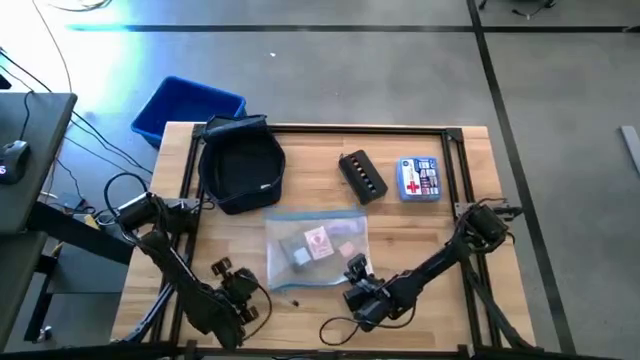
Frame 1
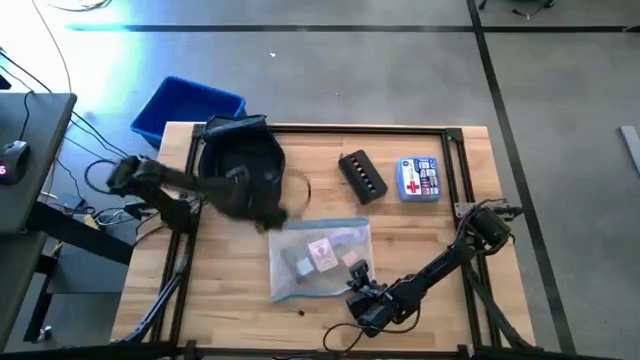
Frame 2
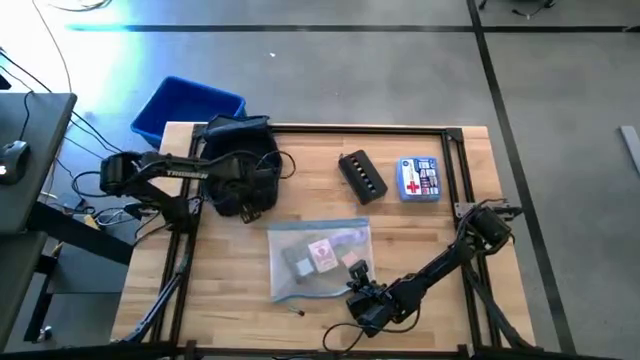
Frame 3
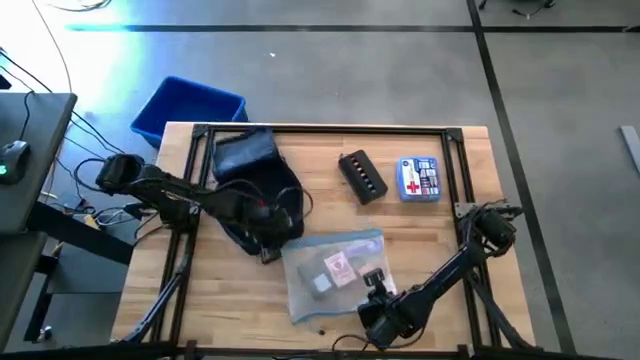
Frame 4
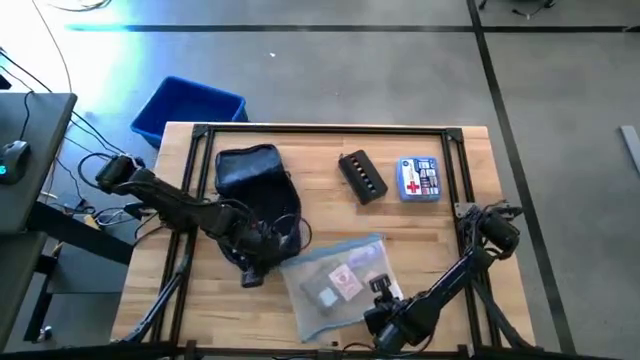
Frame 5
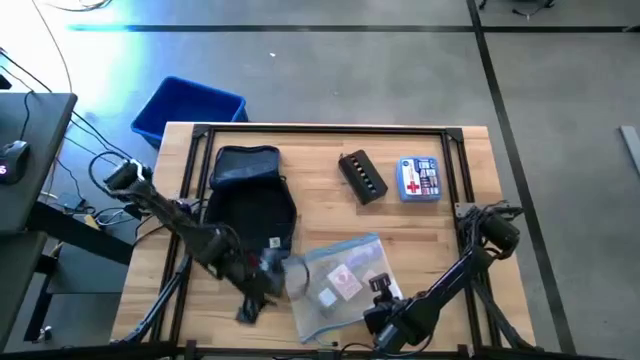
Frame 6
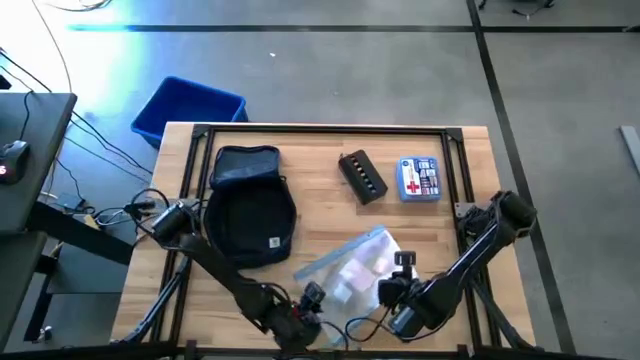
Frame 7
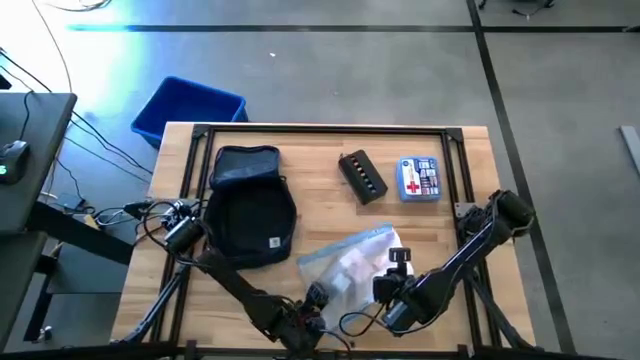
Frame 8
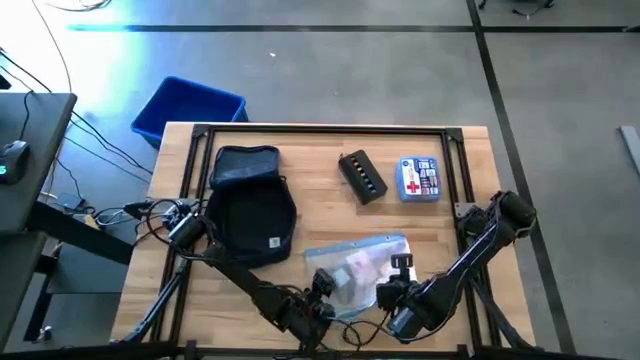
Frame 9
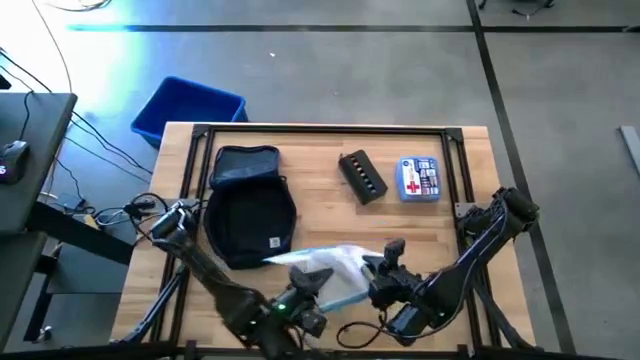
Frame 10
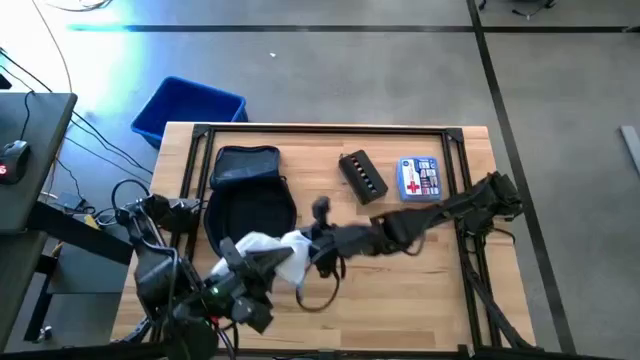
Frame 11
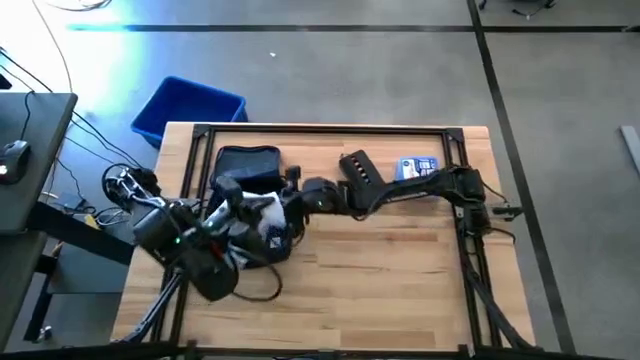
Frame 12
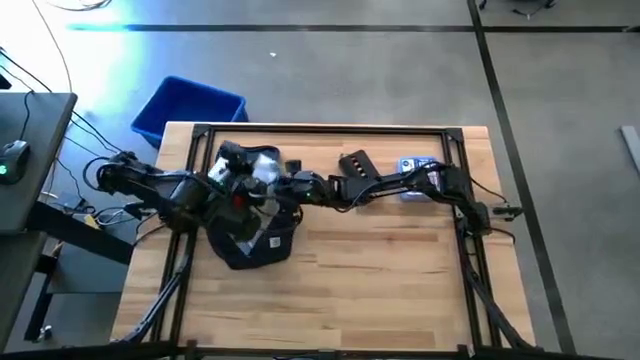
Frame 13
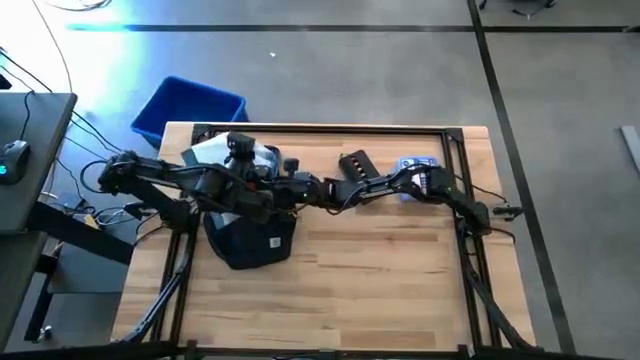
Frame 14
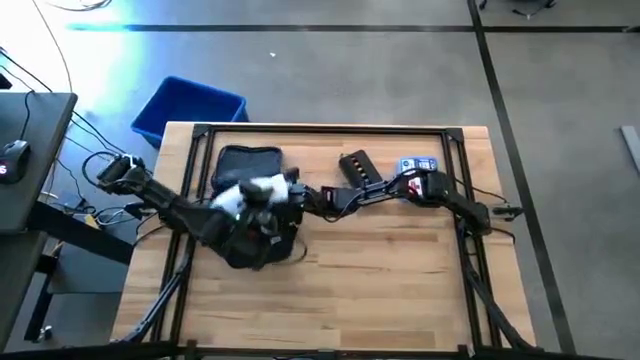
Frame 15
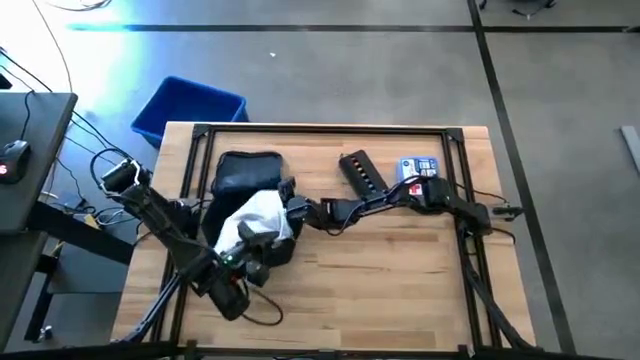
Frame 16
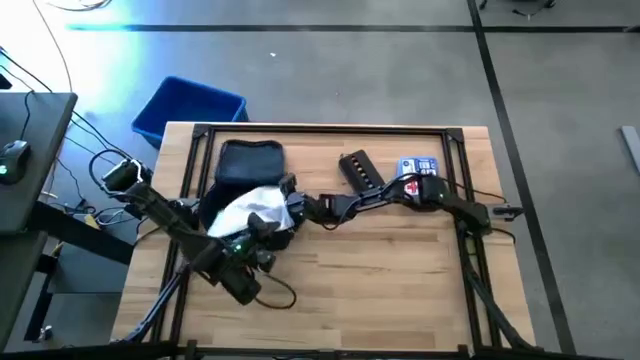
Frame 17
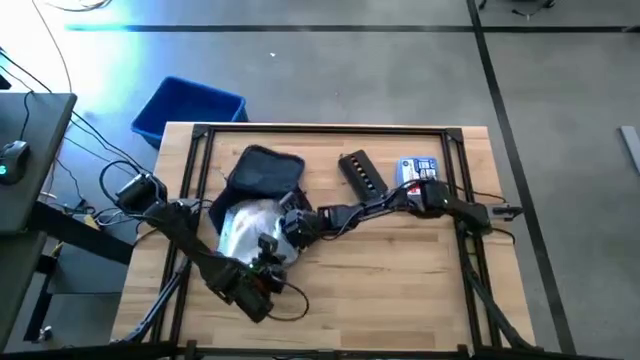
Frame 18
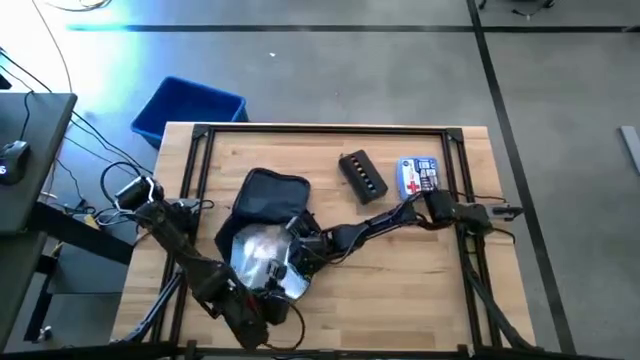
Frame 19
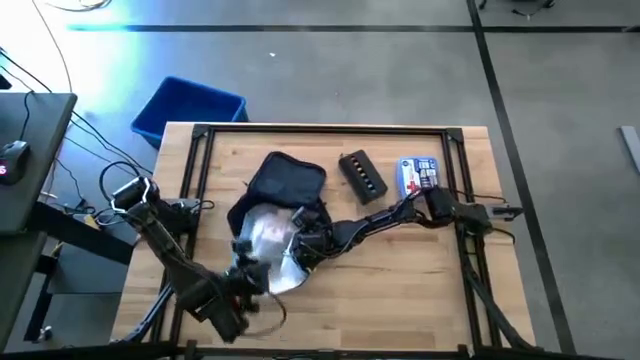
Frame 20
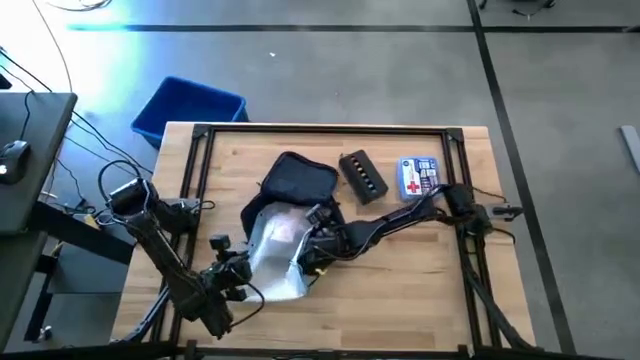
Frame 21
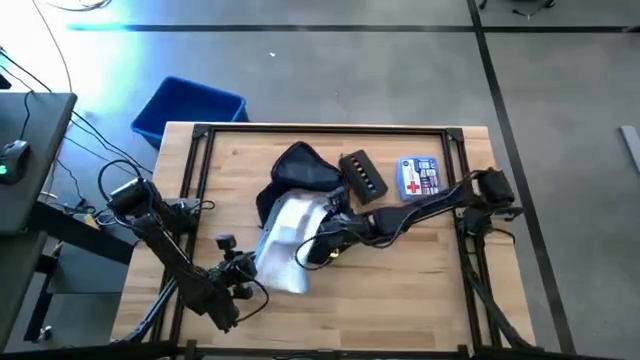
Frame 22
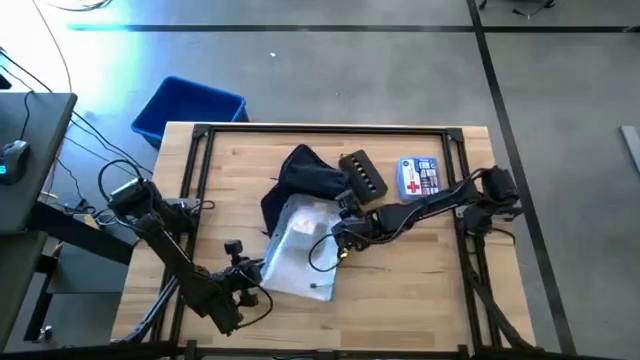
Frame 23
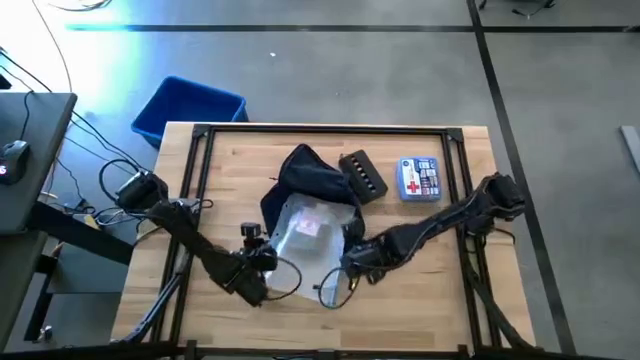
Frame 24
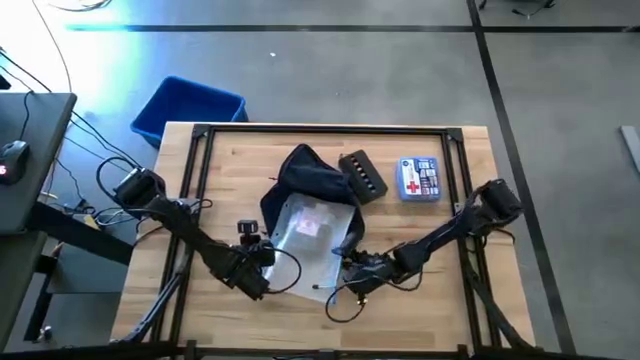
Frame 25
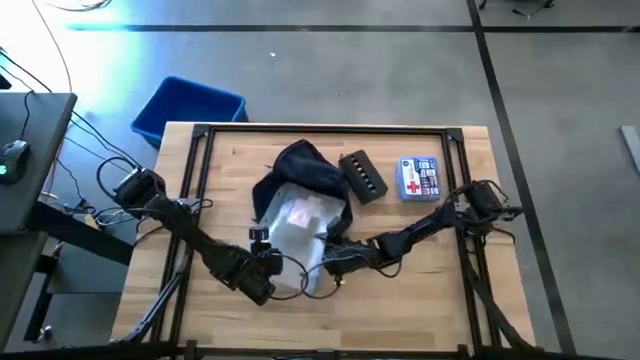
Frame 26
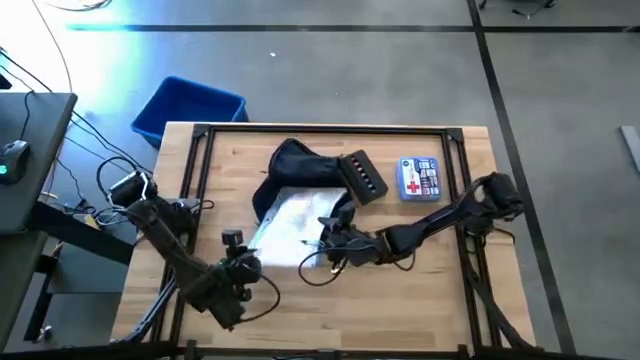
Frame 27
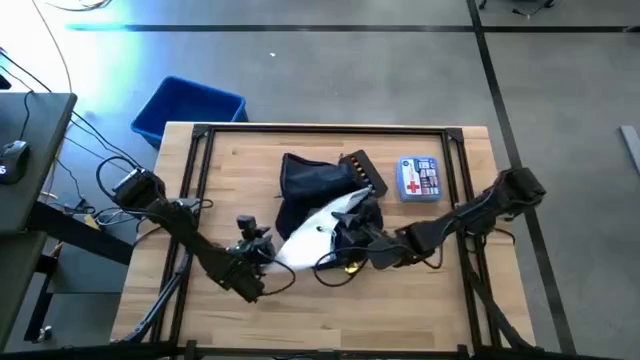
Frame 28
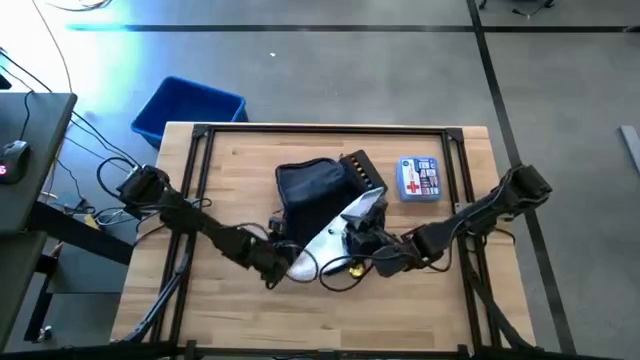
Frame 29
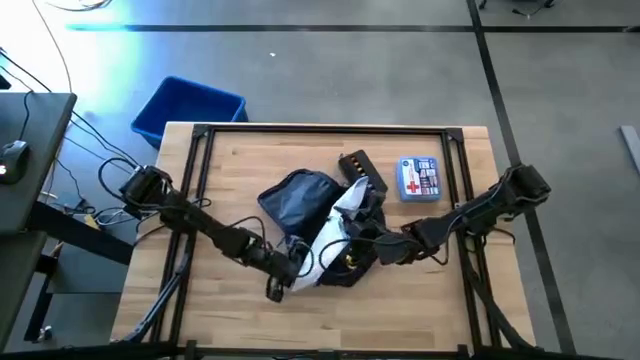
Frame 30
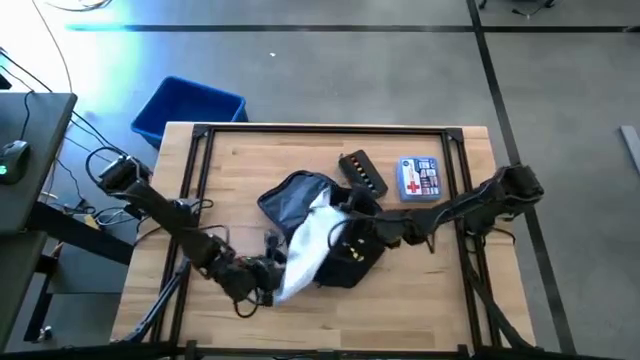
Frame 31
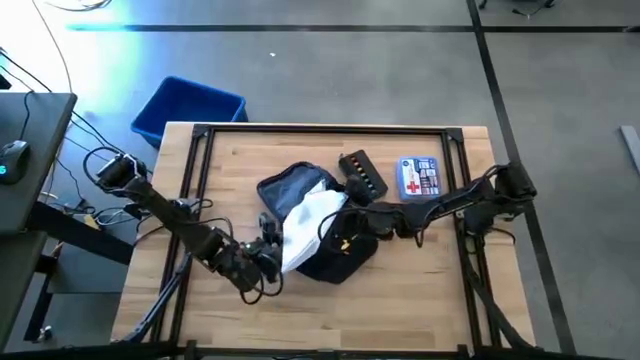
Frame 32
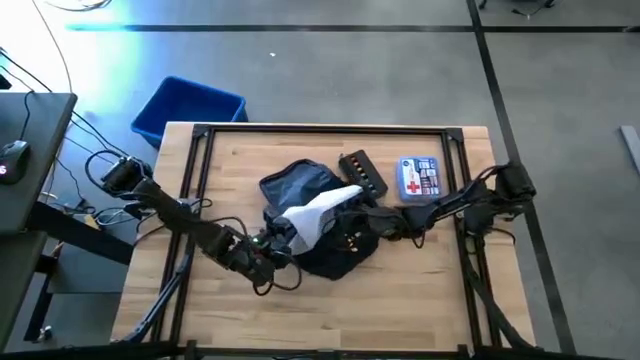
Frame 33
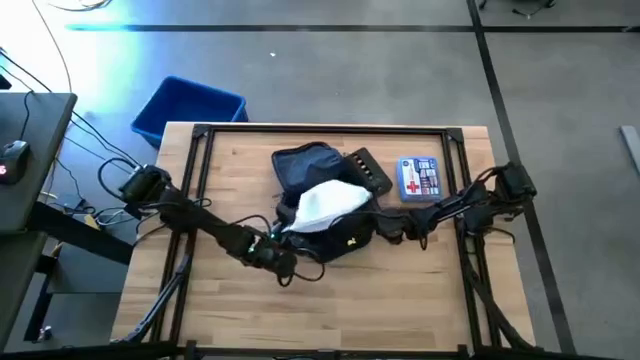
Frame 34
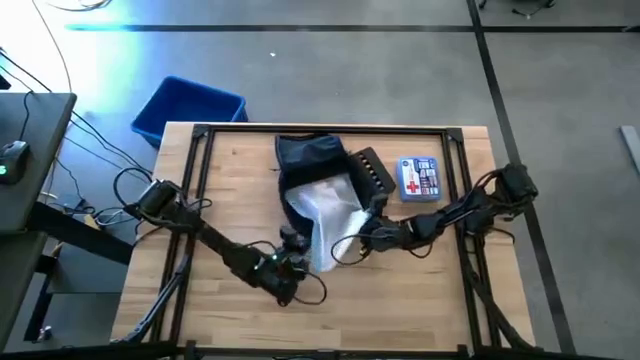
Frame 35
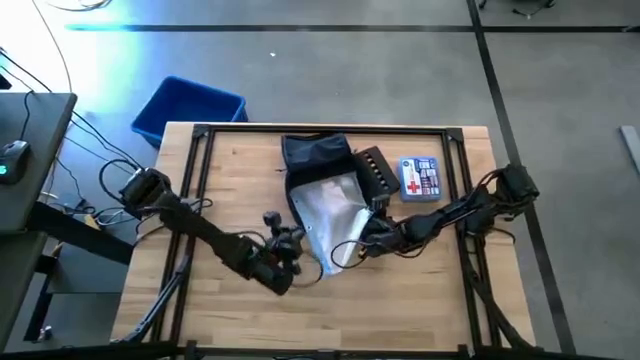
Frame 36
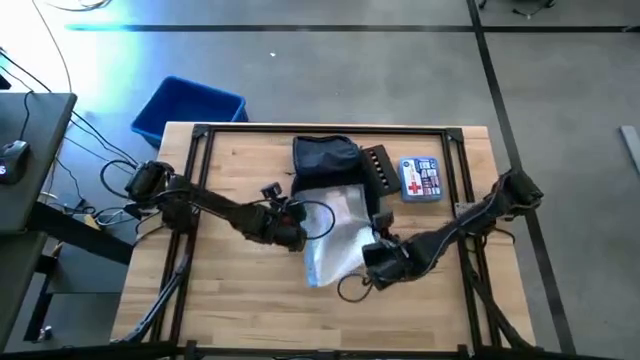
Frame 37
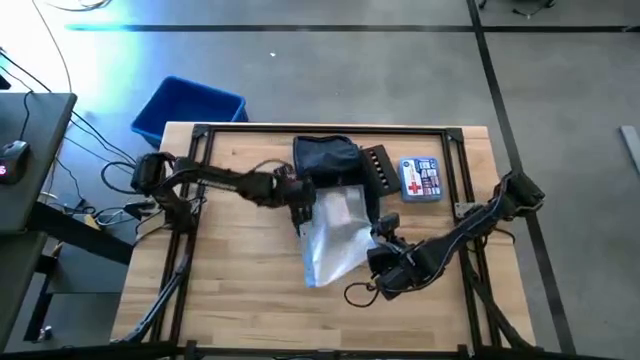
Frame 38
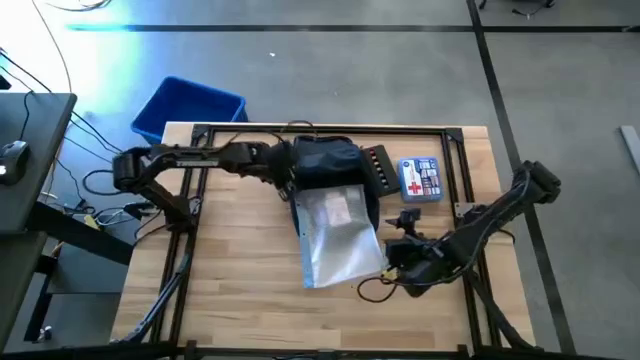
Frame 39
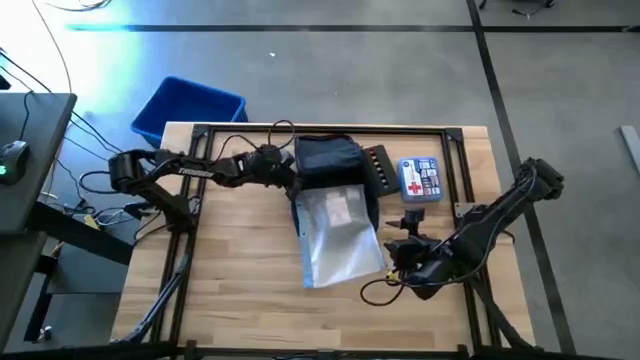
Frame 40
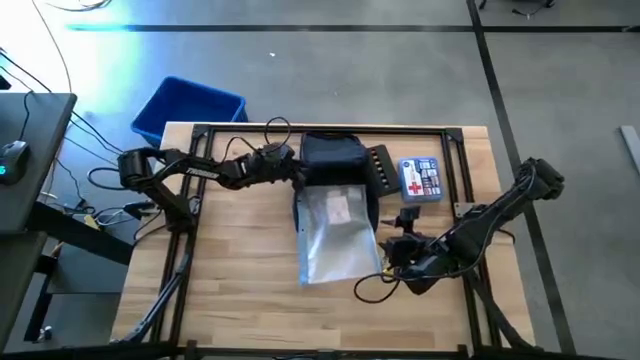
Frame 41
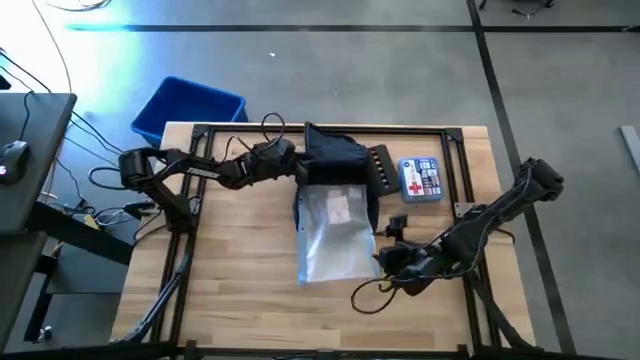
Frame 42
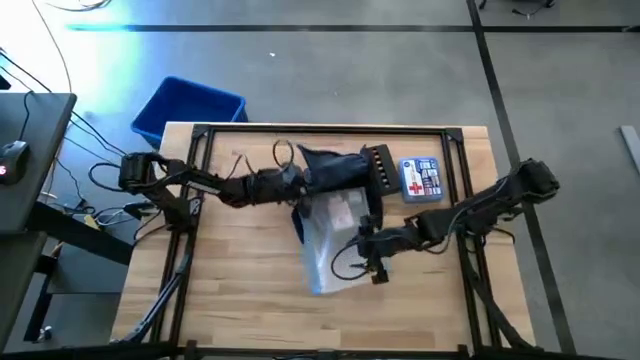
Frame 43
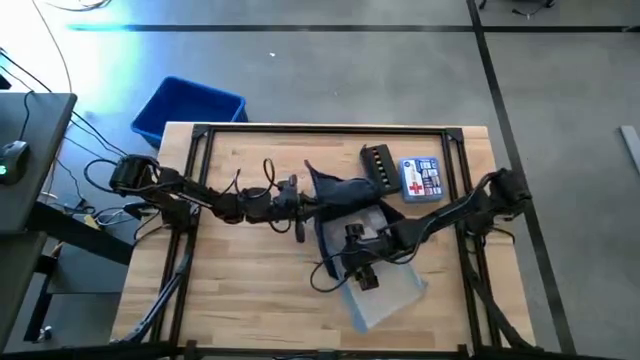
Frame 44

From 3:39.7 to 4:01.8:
Task: Unpack backpack
Put the white zip bag into the backpack
